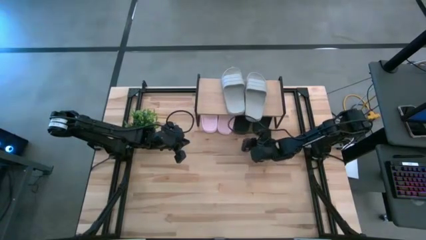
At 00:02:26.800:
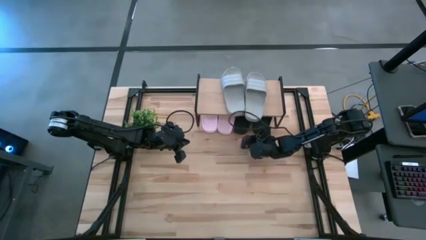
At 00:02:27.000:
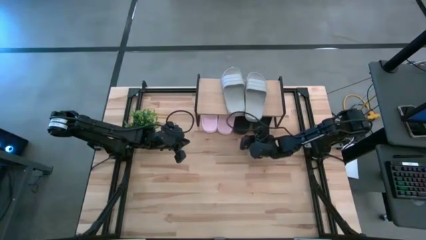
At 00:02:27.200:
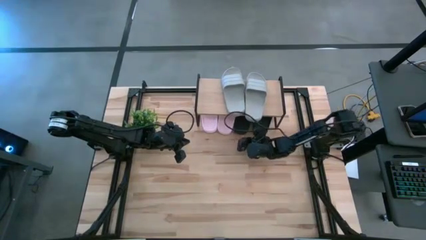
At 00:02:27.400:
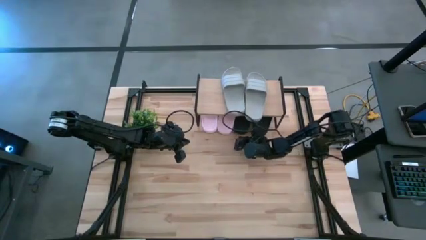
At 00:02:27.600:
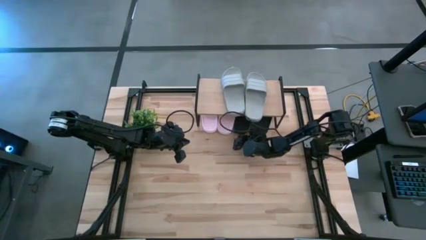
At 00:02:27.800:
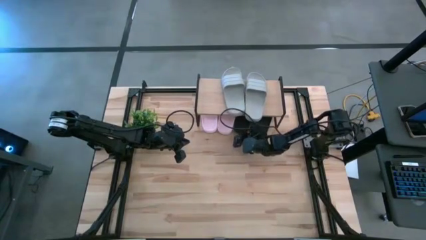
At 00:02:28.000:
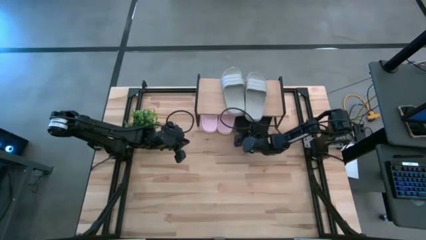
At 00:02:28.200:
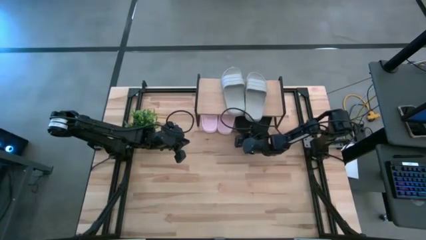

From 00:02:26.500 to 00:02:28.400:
Task: Pick and place slides into the shelf
Adjust the left black slipper

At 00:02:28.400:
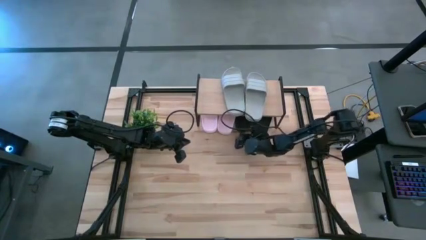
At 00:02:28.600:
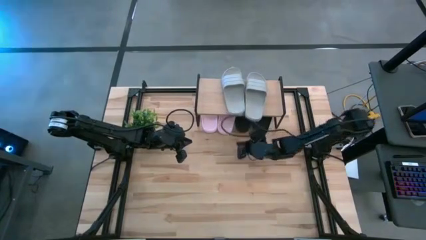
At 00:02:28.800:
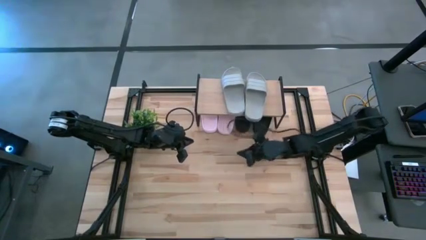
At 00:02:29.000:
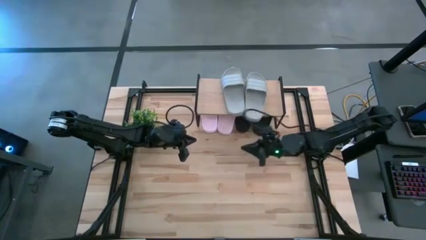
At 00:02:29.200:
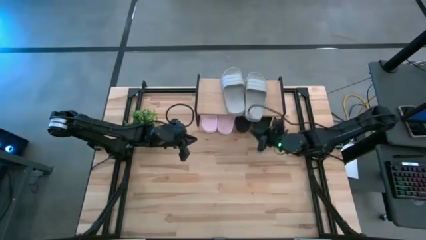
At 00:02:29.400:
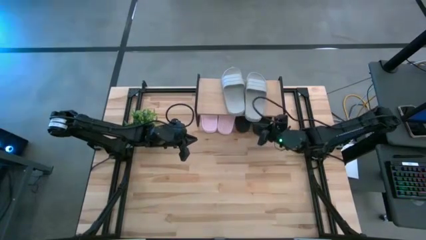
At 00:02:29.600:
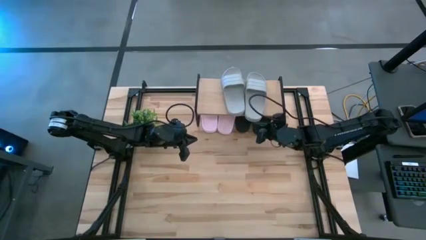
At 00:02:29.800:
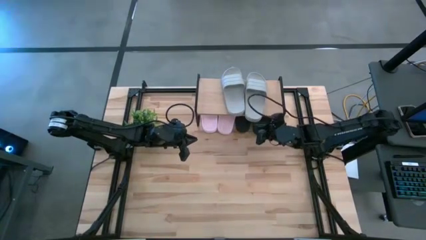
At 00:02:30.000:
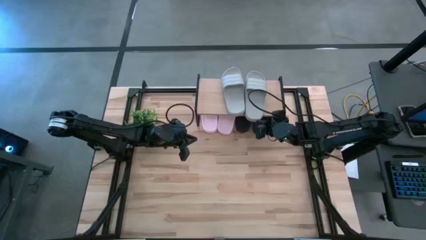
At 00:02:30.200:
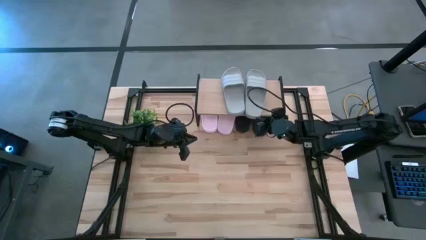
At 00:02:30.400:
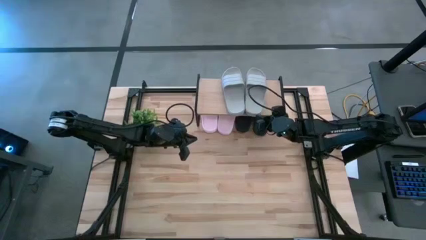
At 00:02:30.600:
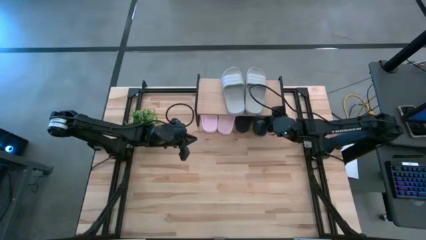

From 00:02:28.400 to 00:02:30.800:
Adjust the right gray slipper

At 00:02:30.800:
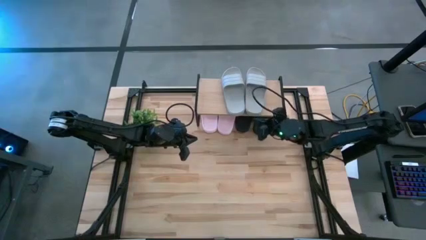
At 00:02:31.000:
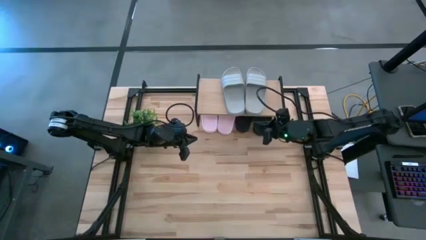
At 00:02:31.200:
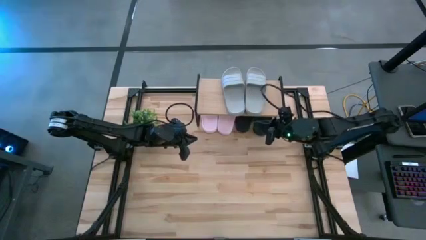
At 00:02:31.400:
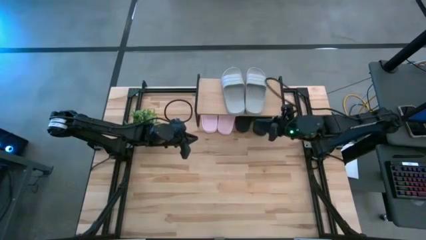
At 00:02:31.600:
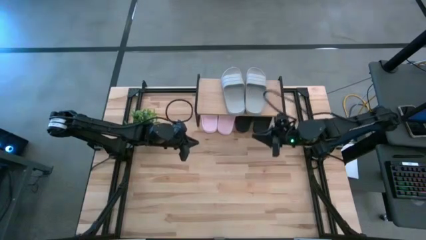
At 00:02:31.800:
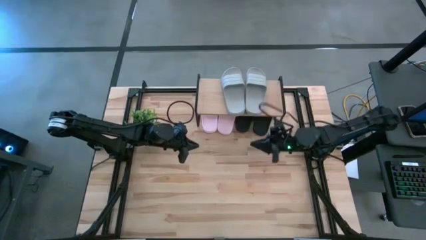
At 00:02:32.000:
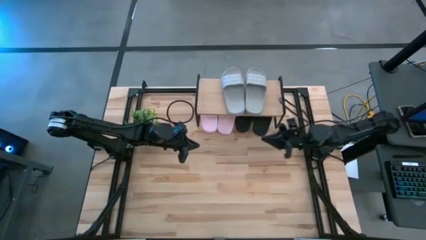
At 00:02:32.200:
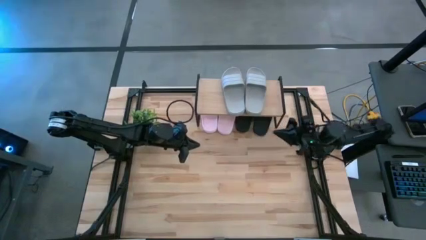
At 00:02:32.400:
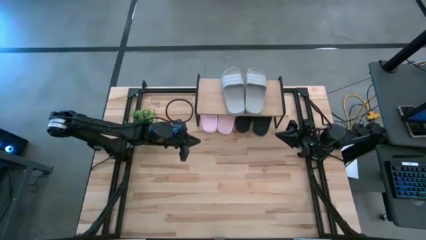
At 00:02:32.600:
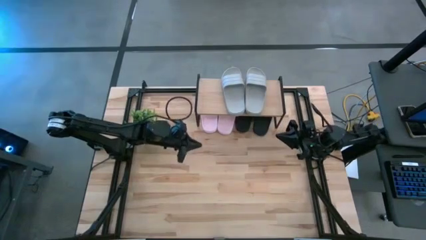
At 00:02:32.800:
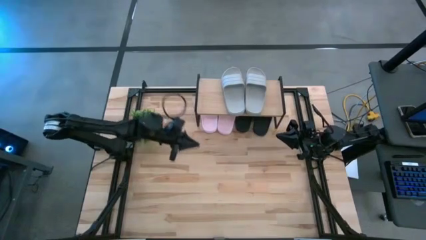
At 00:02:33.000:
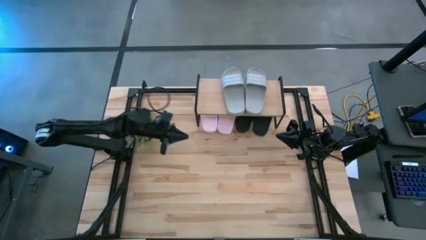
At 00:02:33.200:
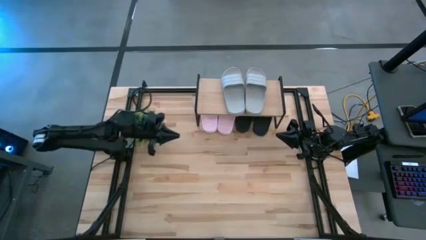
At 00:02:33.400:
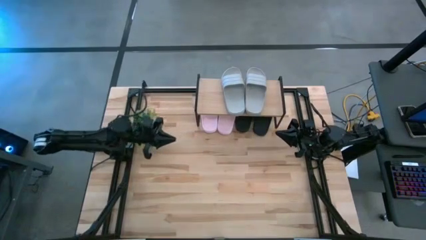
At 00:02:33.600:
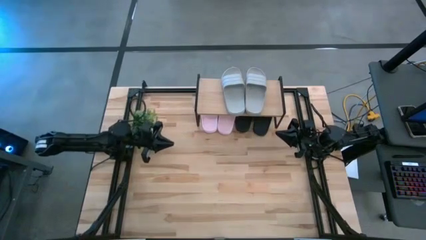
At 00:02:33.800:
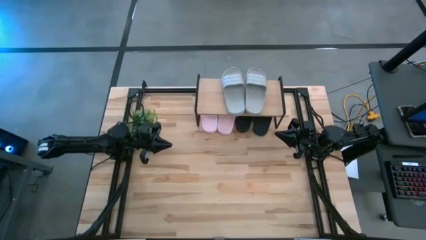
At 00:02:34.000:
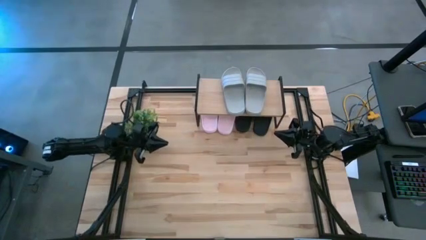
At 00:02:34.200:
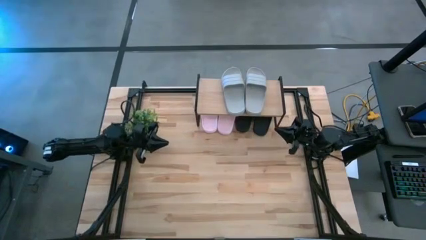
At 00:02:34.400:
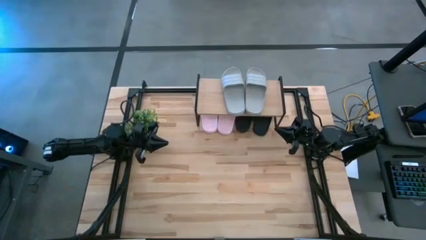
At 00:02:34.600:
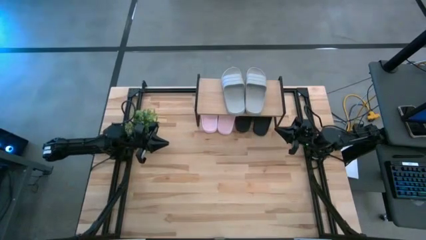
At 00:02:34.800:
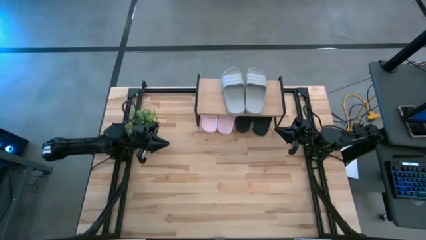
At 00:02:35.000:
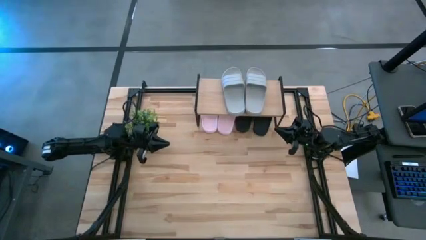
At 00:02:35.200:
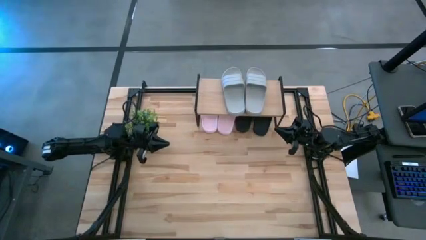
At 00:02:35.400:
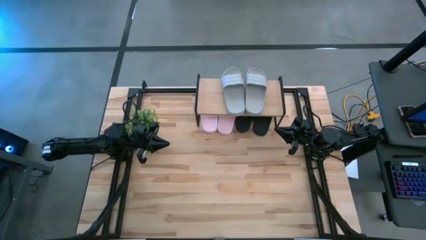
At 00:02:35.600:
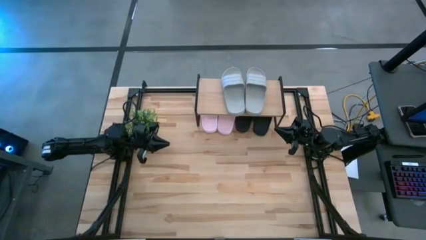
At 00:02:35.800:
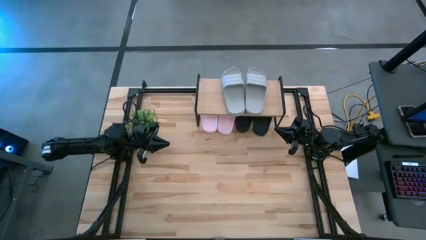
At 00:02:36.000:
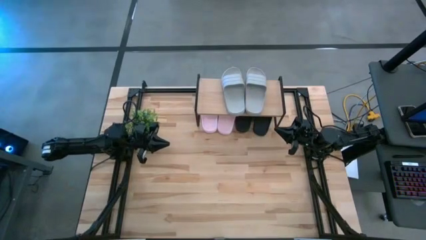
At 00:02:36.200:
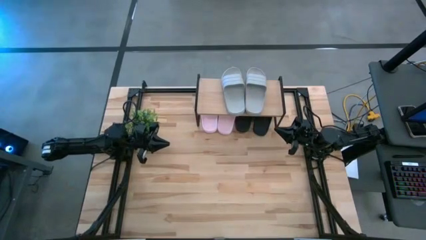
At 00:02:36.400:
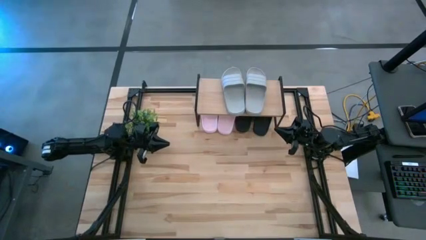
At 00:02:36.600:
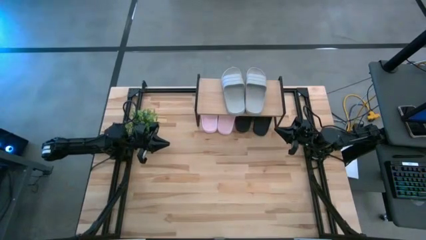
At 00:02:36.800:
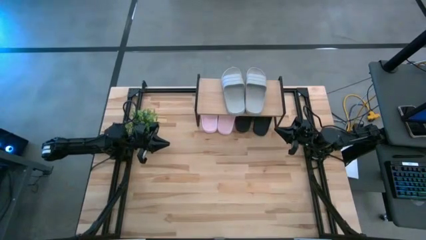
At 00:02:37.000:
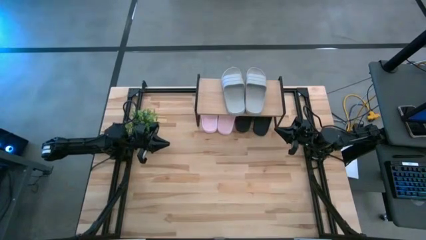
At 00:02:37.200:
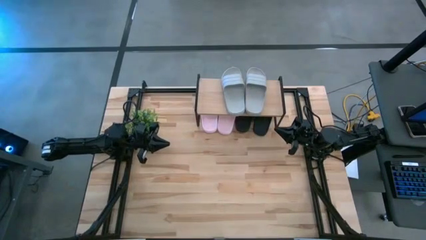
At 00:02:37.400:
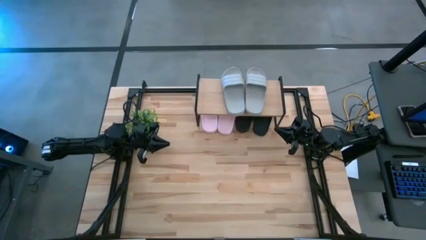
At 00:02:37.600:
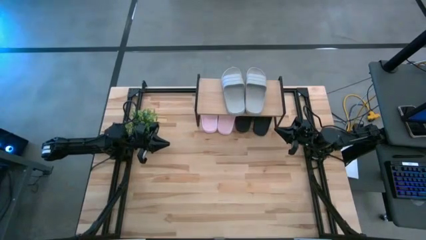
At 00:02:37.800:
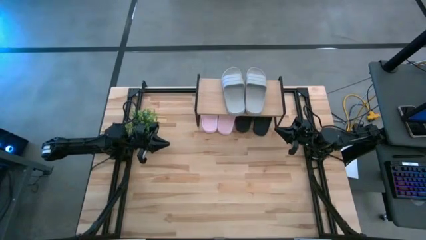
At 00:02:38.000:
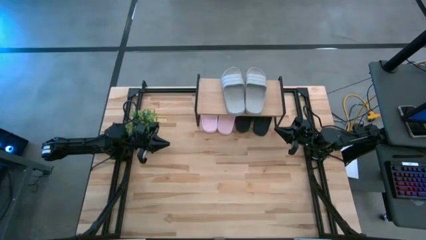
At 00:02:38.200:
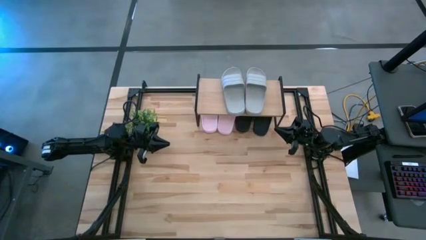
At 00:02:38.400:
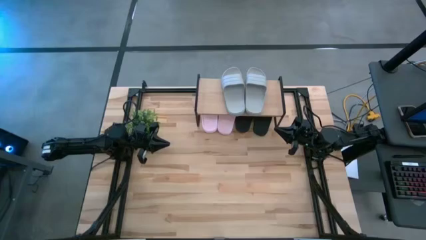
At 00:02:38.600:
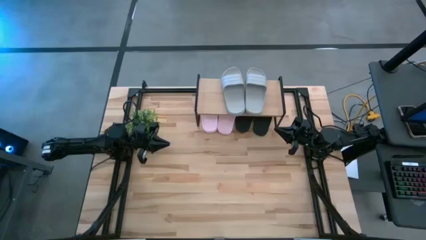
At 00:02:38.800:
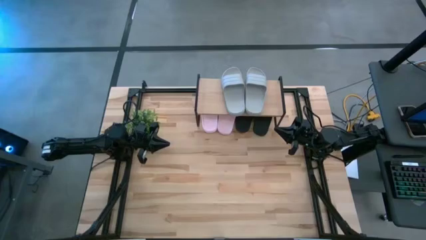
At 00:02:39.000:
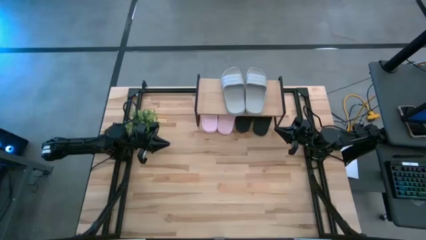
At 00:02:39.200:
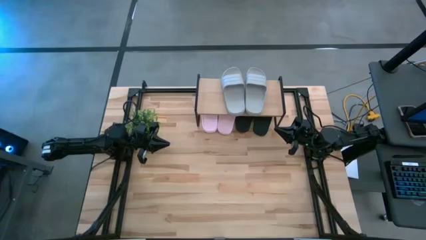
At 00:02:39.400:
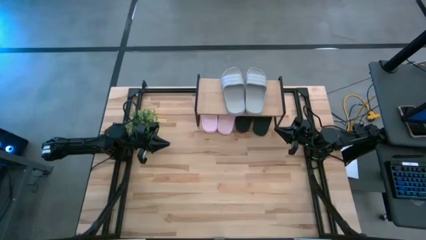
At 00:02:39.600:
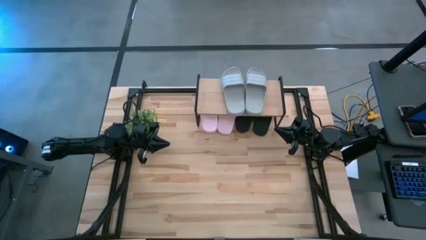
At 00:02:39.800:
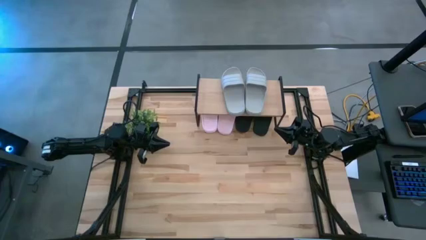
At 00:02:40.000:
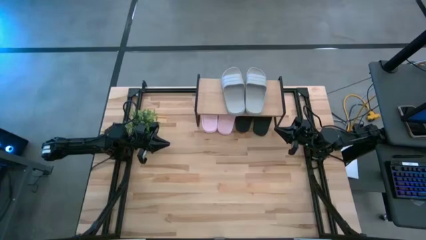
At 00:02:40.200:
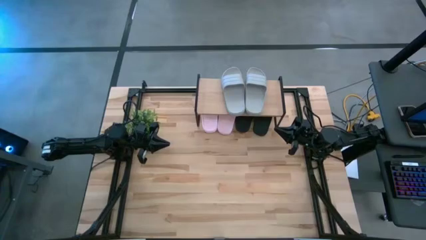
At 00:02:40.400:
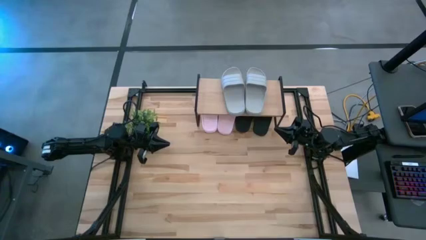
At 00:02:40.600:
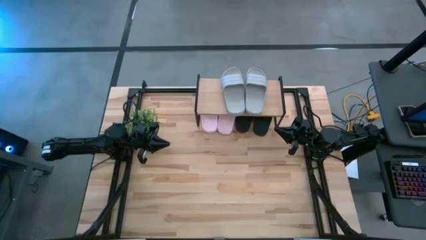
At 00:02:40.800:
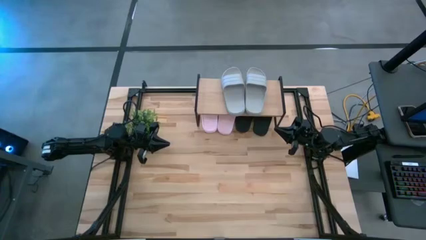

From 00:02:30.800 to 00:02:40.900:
Return to Home Position
